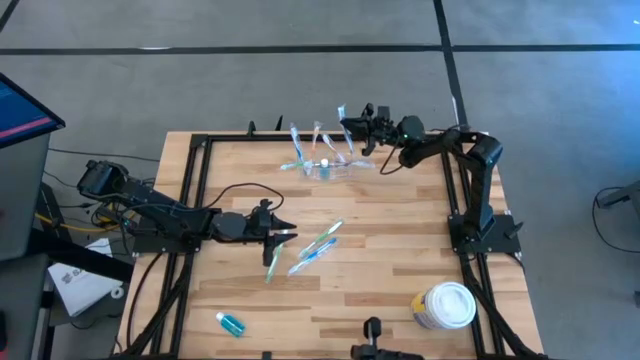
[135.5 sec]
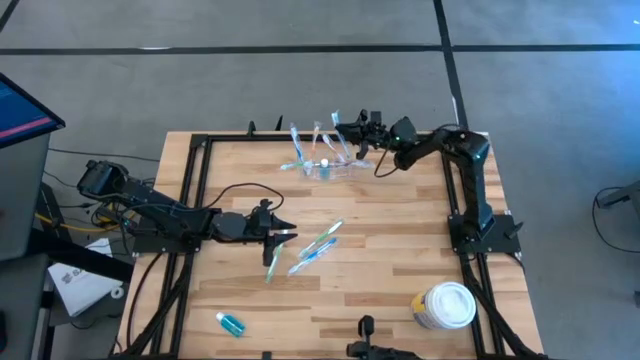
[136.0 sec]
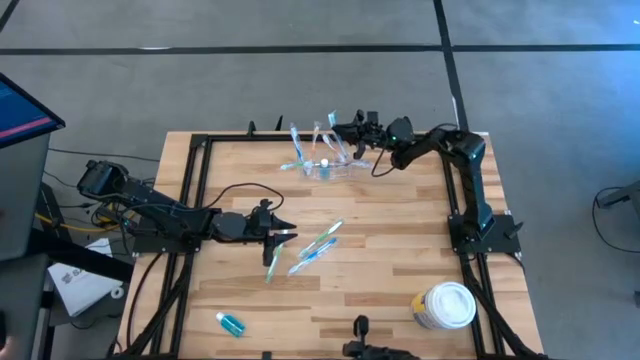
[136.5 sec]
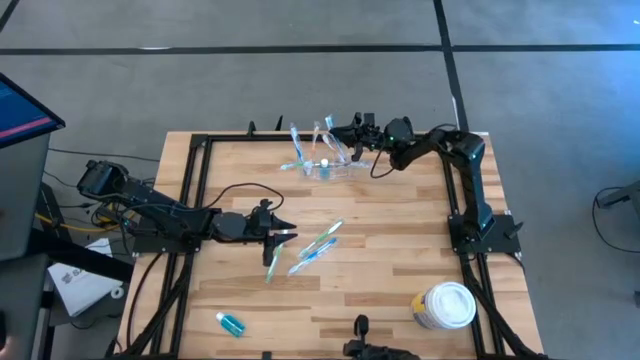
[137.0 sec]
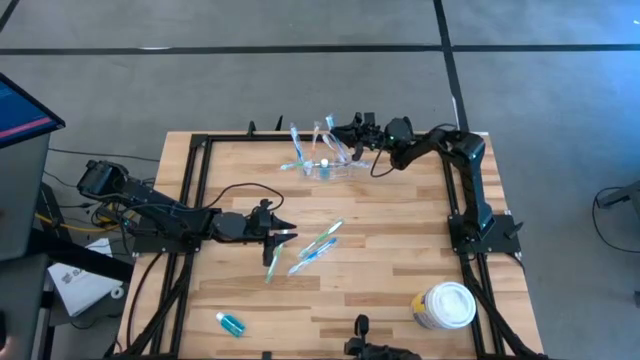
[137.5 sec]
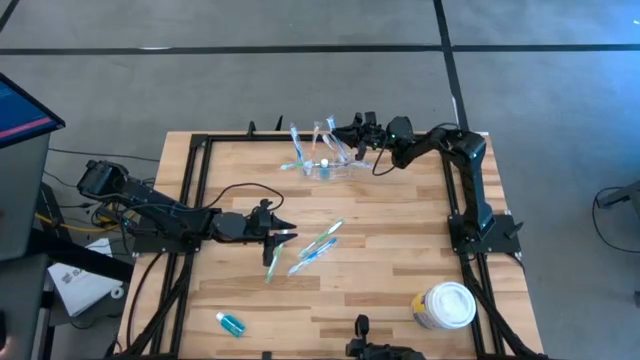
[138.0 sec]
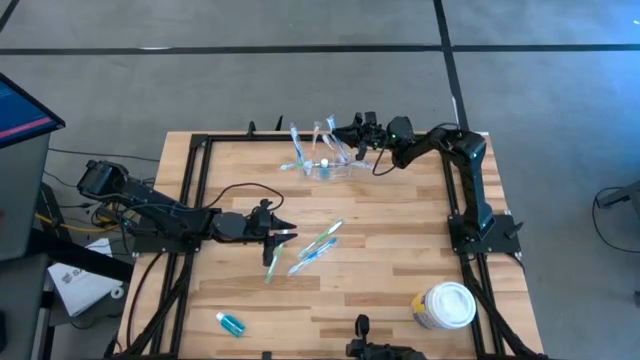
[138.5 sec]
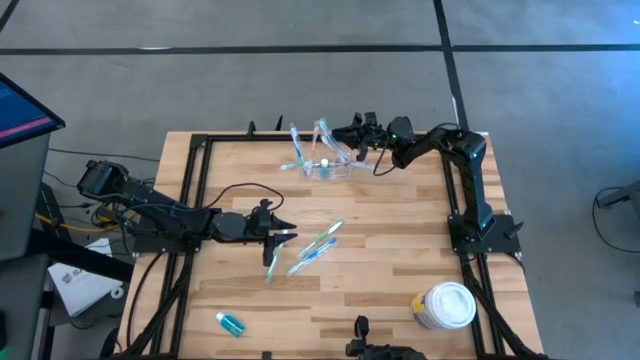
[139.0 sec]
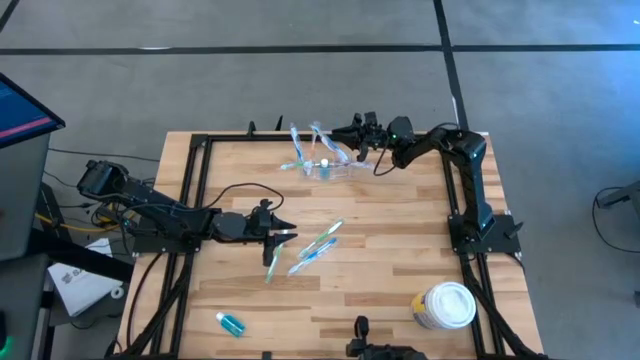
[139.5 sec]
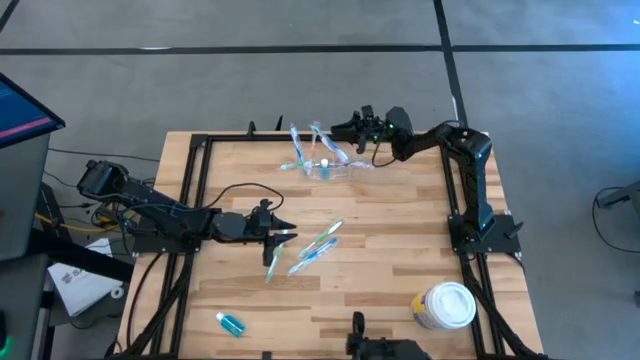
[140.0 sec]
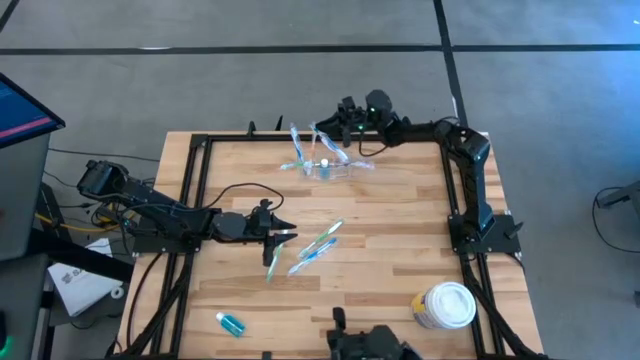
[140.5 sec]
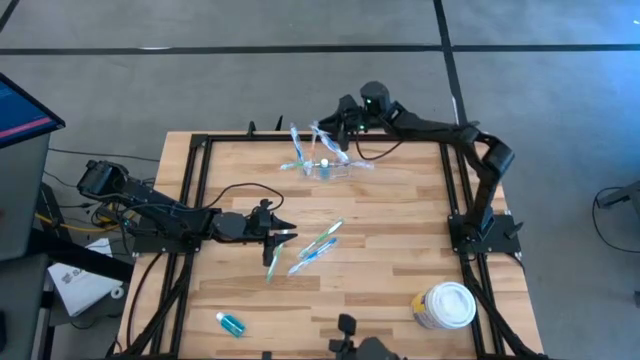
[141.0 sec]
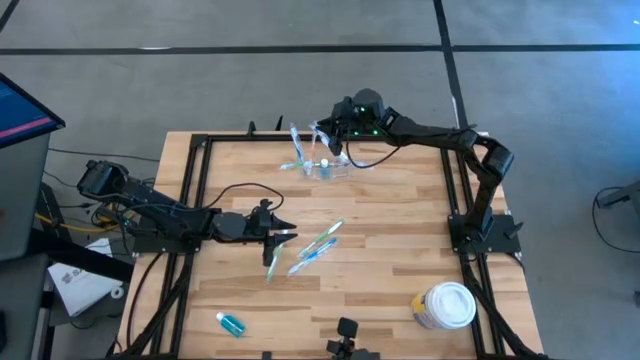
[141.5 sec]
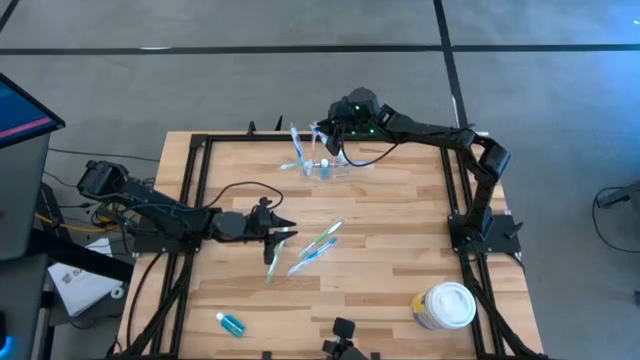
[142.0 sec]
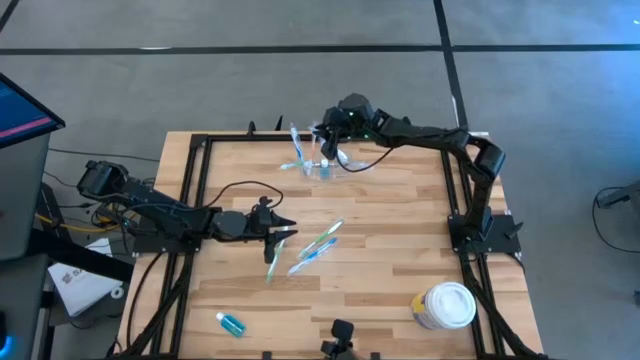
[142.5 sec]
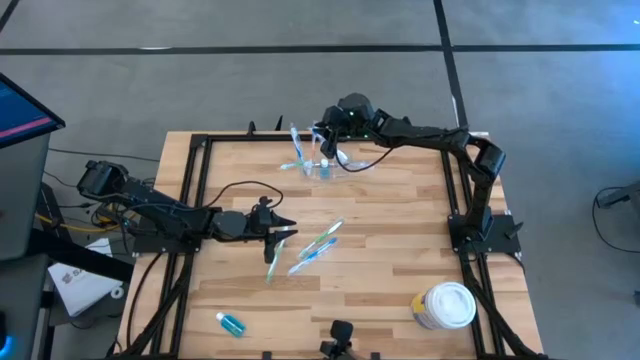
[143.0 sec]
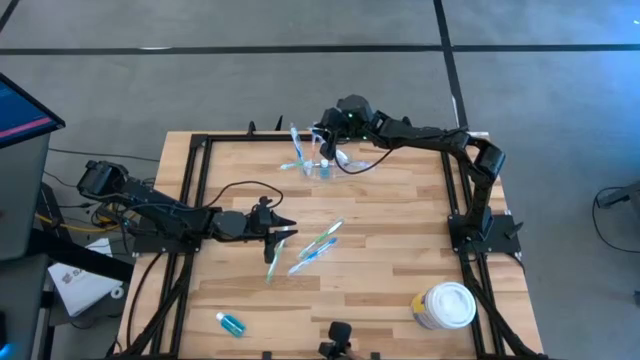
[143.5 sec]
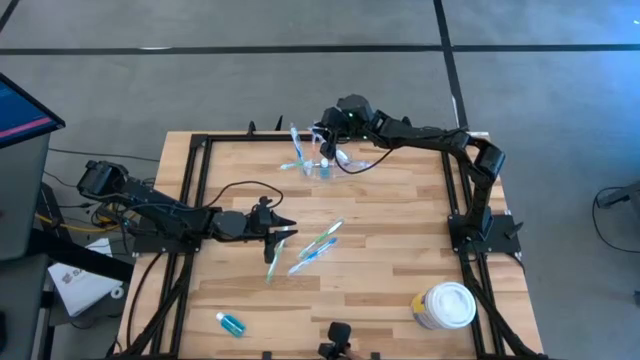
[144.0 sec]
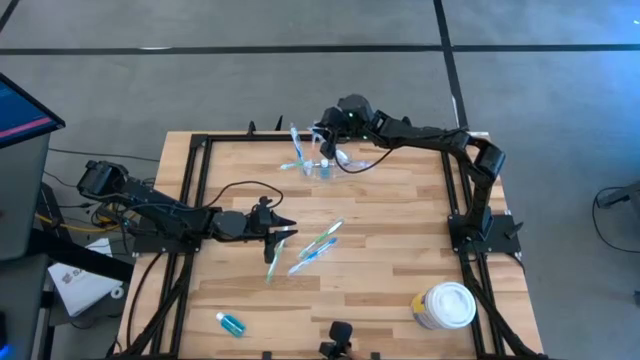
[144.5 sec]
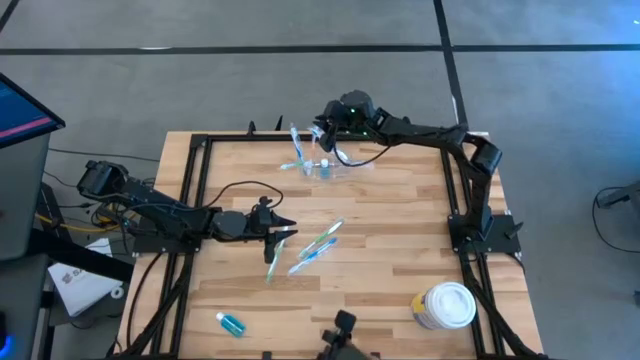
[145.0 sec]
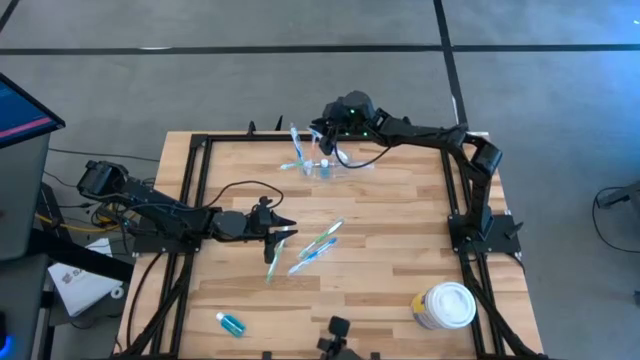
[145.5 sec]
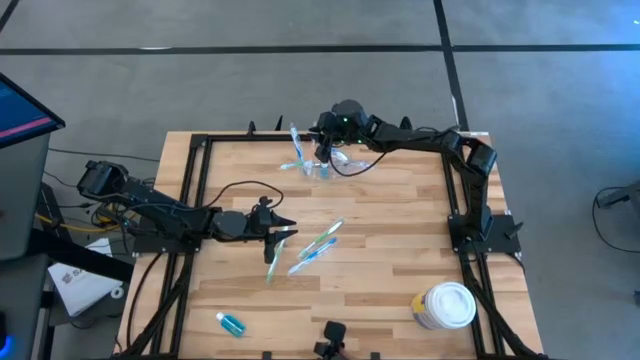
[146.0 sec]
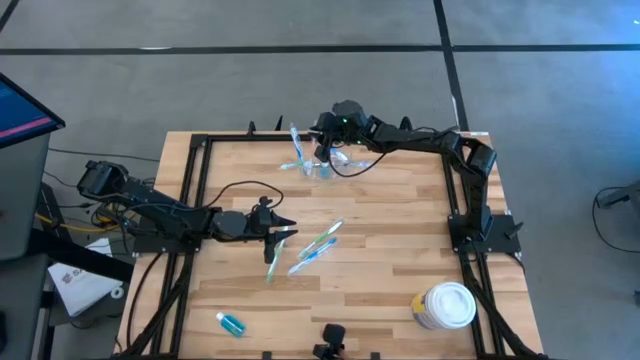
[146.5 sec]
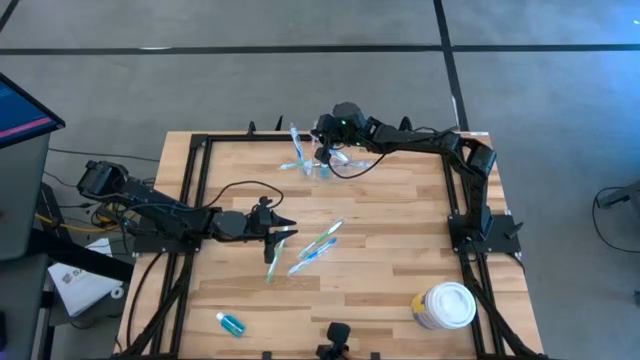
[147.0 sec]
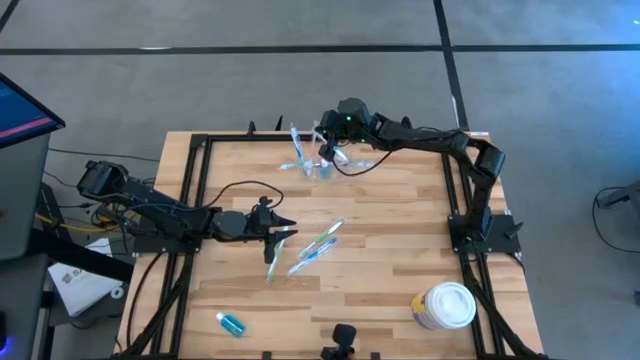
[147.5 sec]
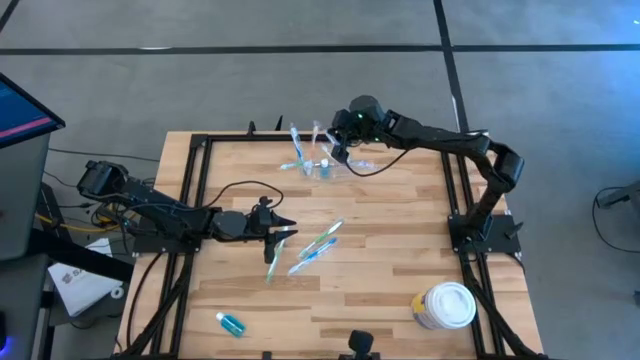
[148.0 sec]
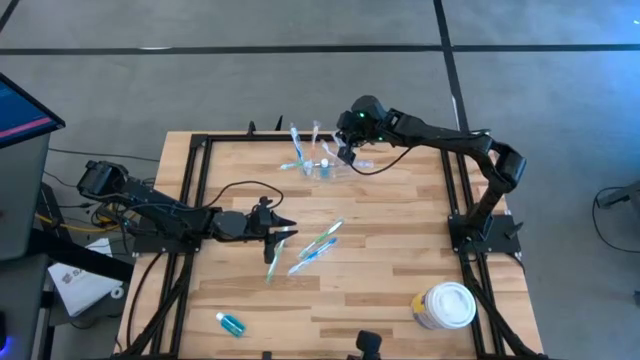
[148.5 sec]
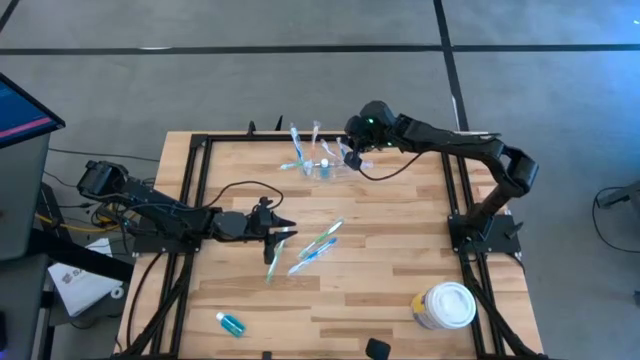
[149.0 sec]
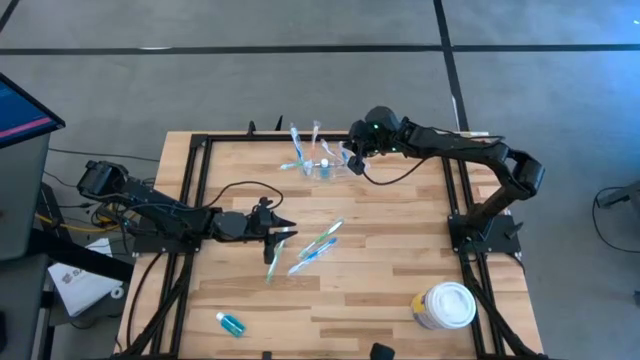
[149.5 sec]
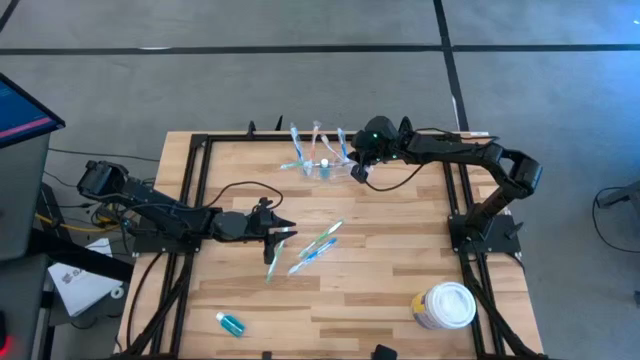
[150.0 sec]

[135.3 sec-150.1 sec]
Task: Pick & Place toothbrushing station
Put the blue toothbrush into the transparent organizer

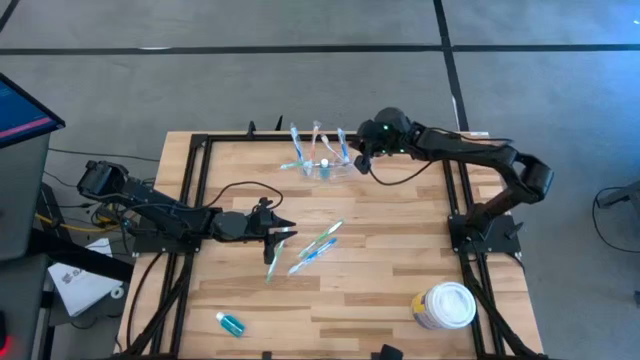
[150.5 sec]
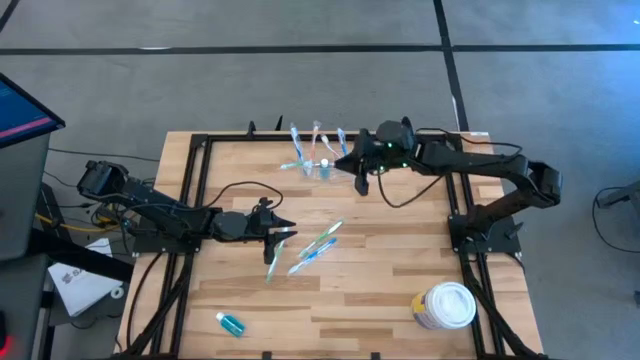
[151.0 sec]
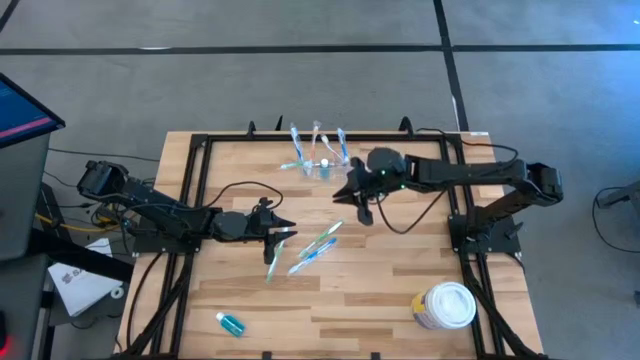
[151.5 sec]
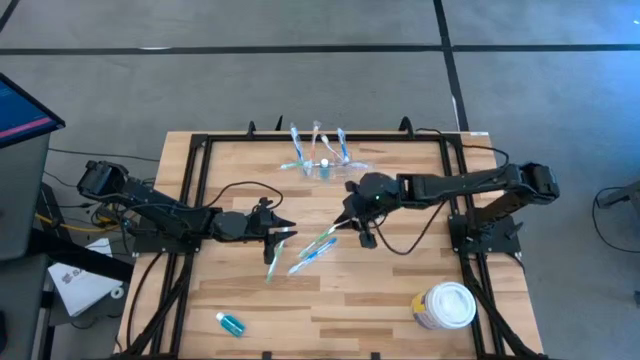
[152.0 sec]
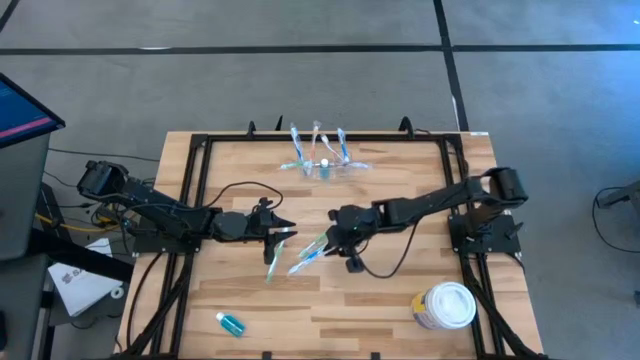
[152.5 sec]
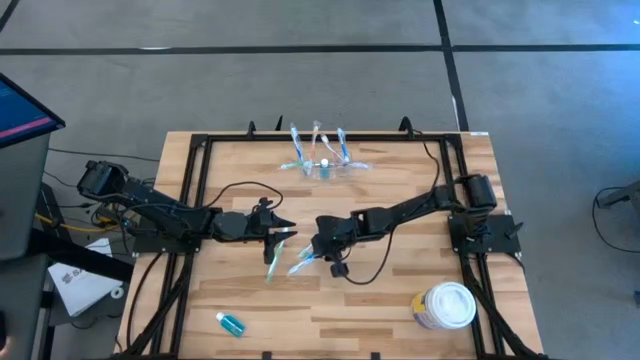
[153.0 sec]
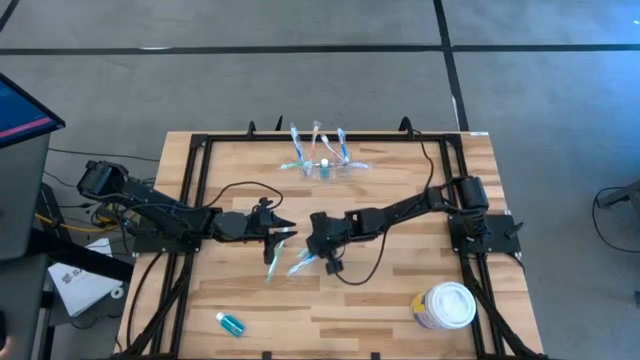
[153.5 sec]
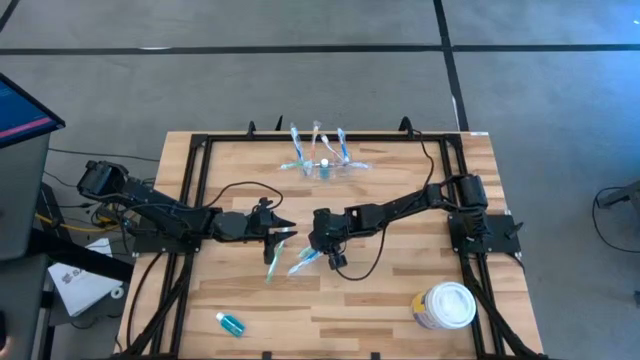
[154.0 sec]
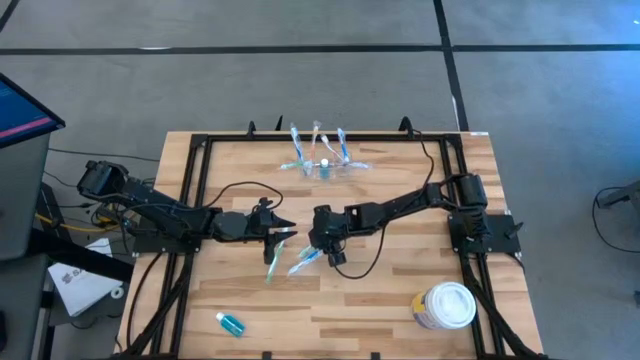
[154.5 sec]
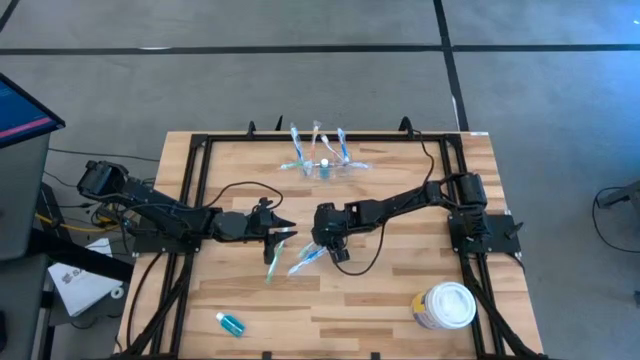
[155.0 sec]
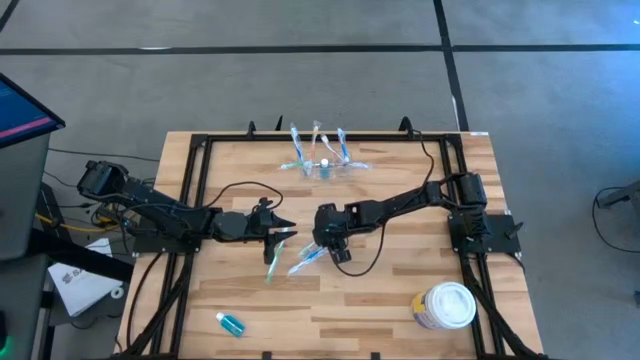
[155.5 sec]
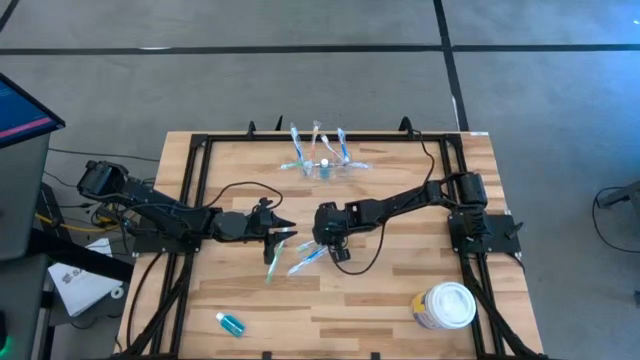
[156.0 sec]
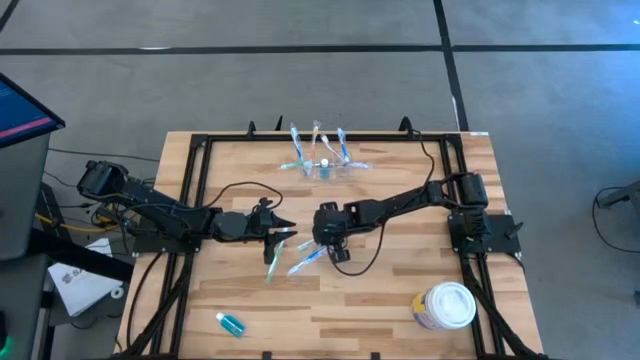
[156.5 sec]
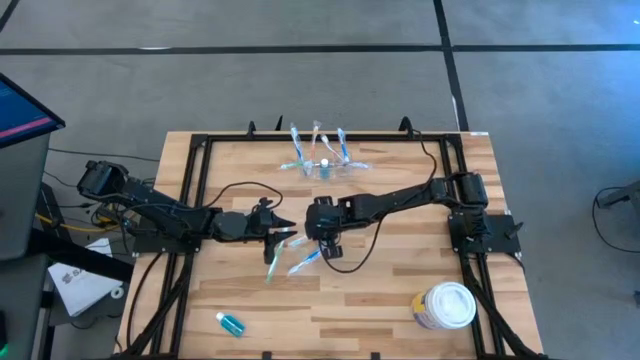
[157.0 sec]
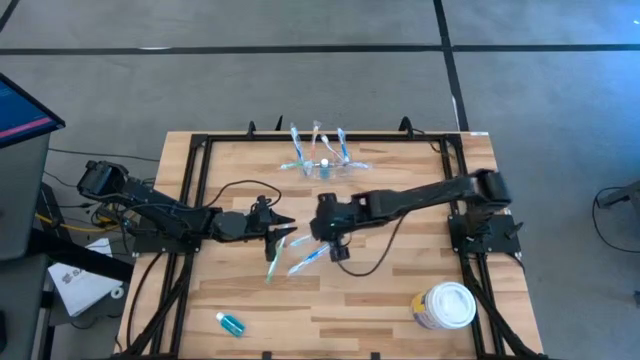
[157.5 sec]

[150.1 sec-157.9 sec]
Put the green toothbrush into the transparent organizer
